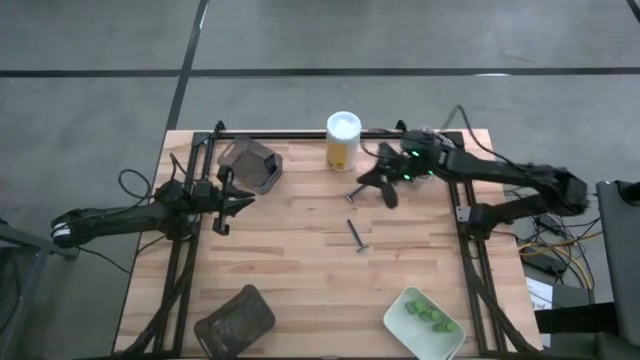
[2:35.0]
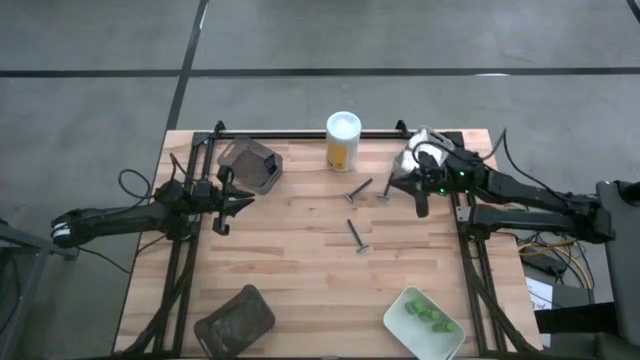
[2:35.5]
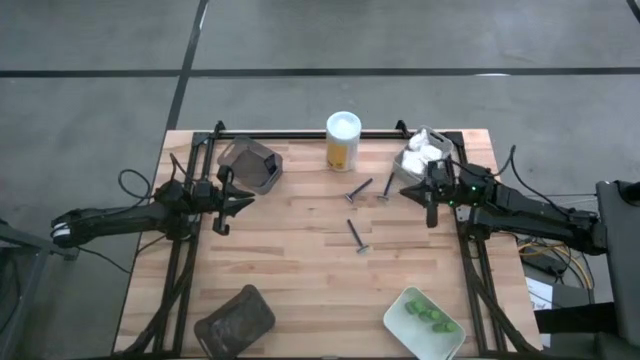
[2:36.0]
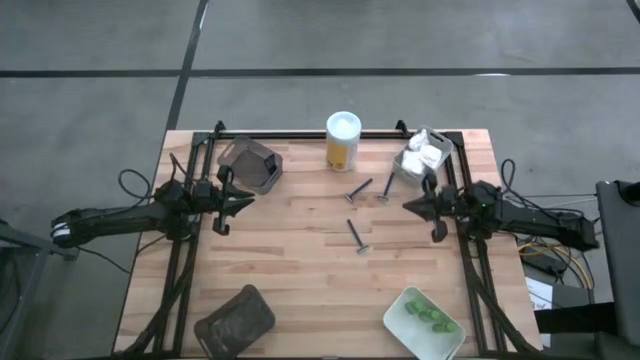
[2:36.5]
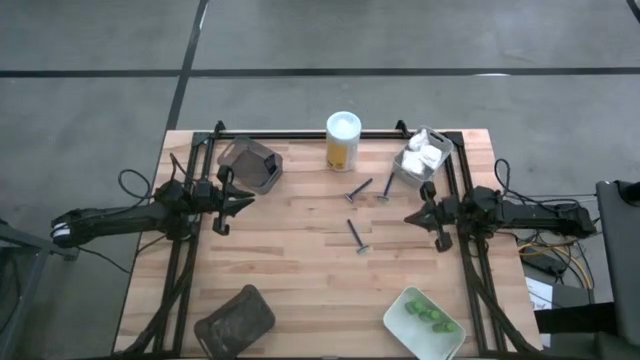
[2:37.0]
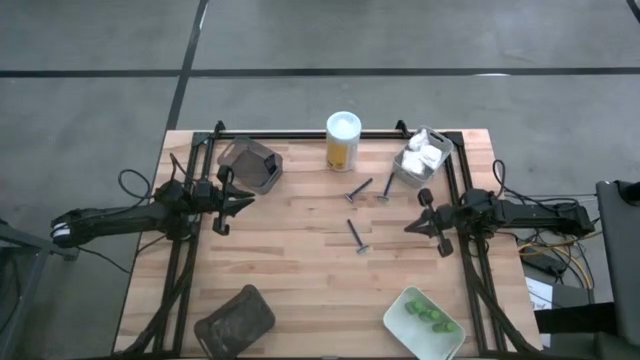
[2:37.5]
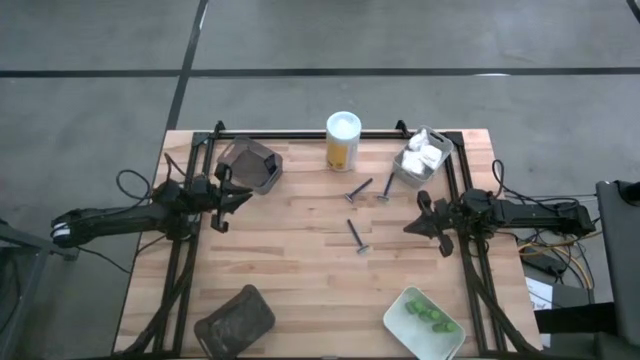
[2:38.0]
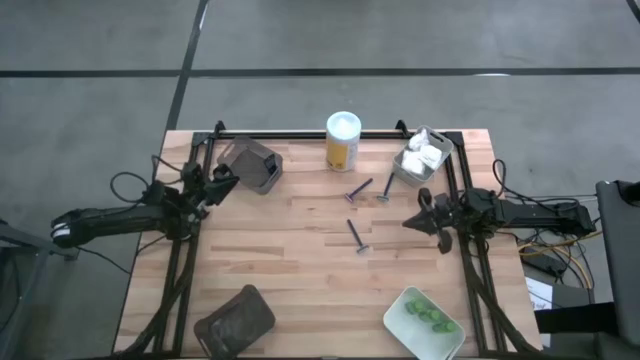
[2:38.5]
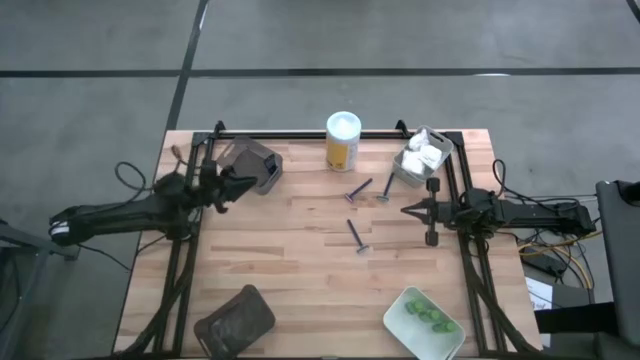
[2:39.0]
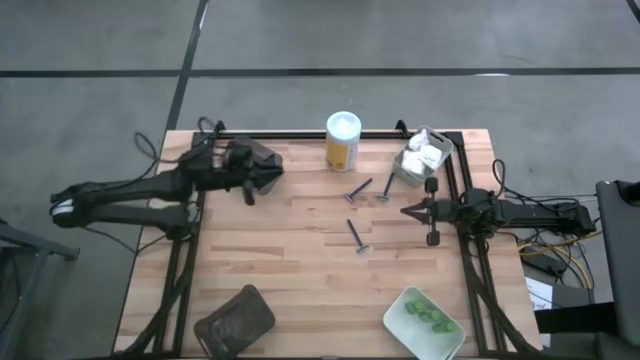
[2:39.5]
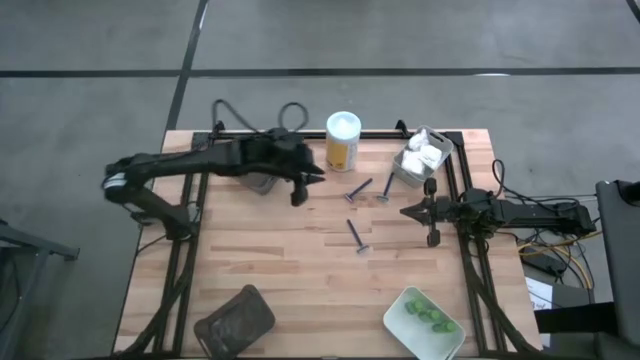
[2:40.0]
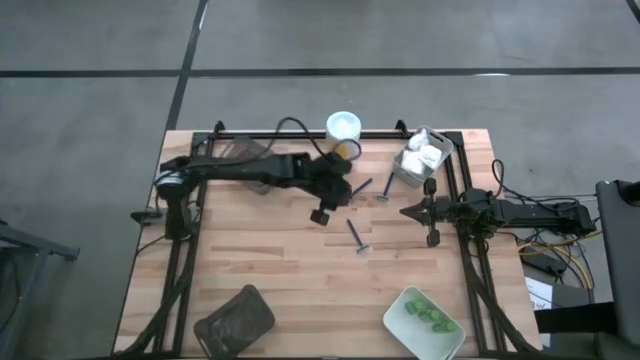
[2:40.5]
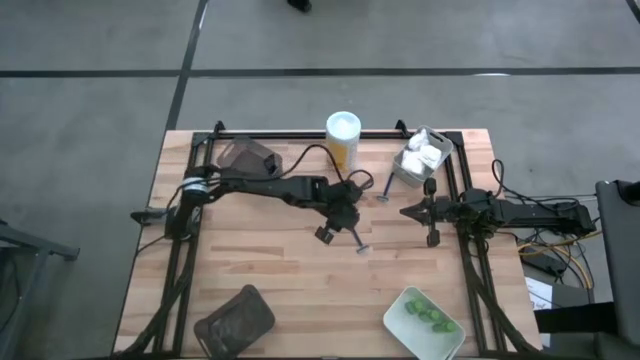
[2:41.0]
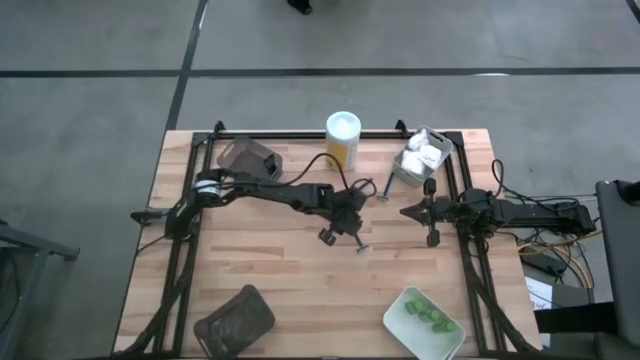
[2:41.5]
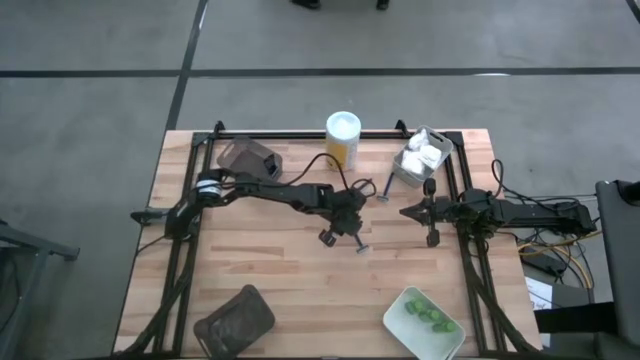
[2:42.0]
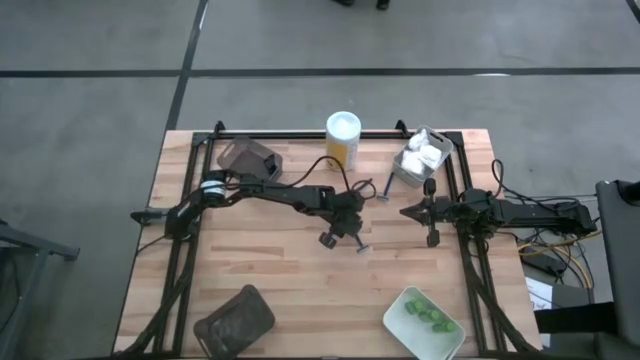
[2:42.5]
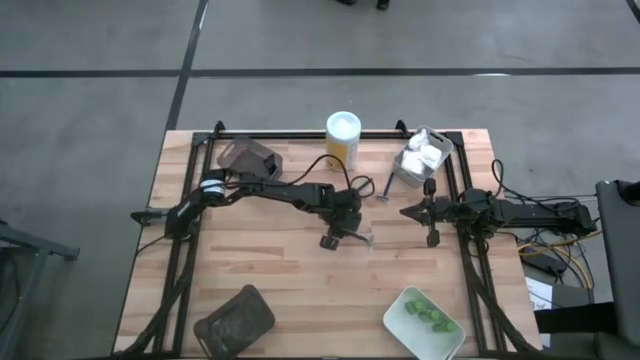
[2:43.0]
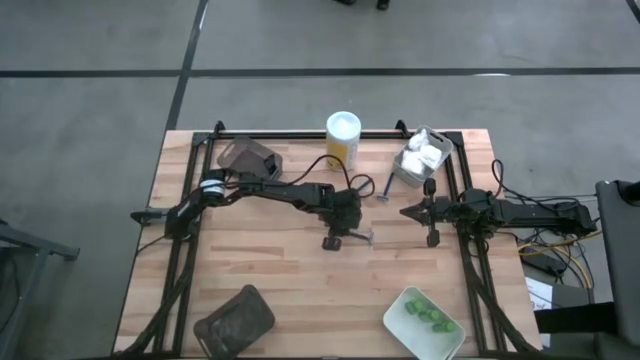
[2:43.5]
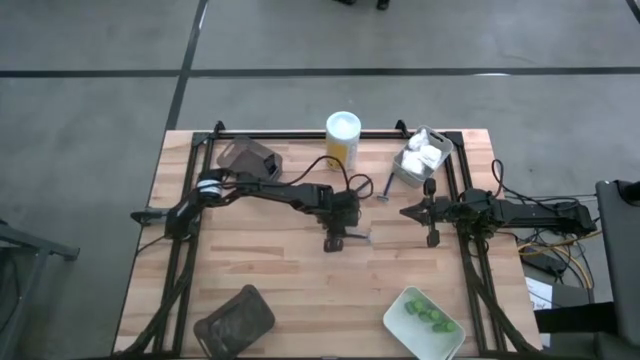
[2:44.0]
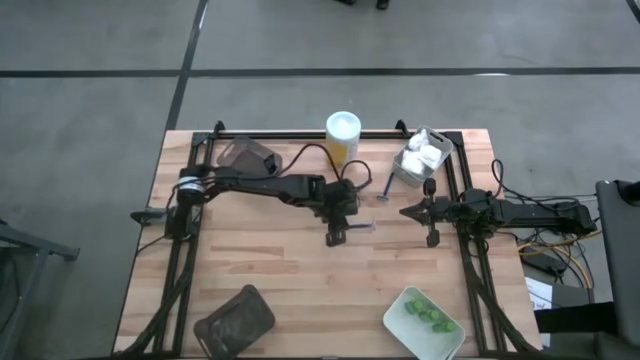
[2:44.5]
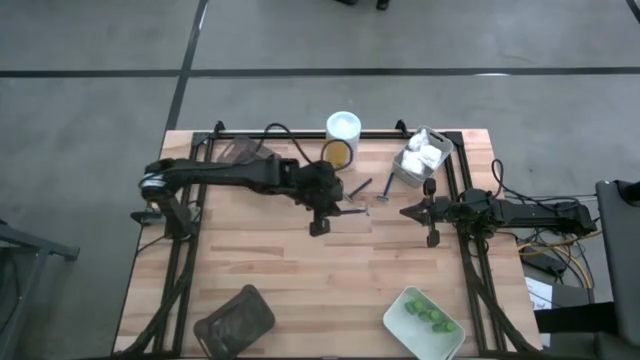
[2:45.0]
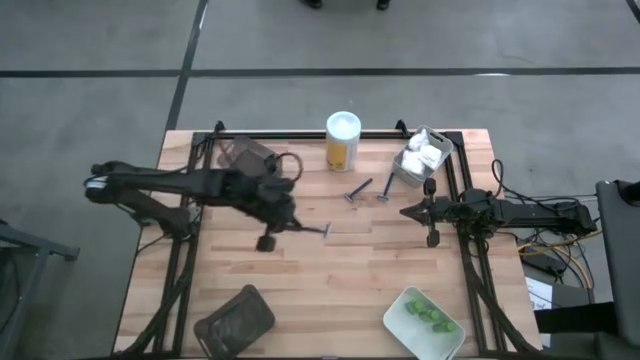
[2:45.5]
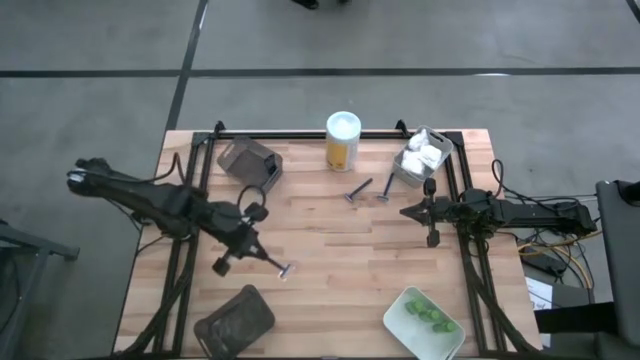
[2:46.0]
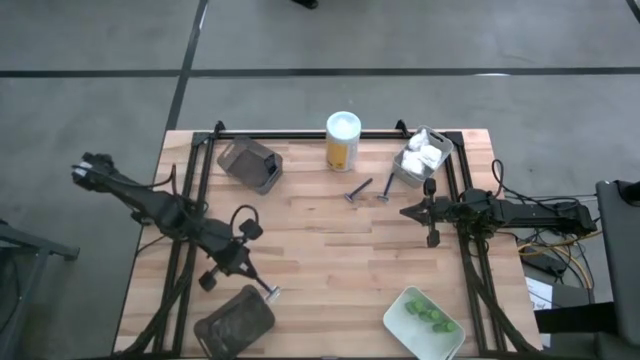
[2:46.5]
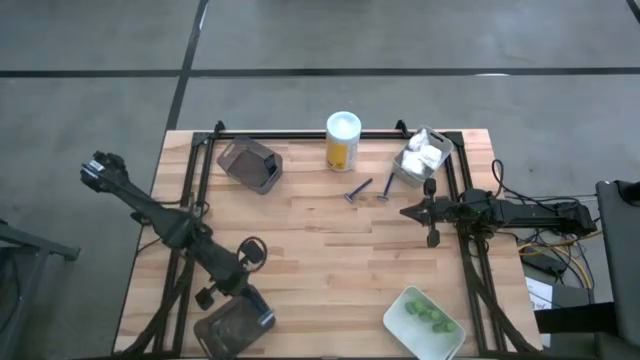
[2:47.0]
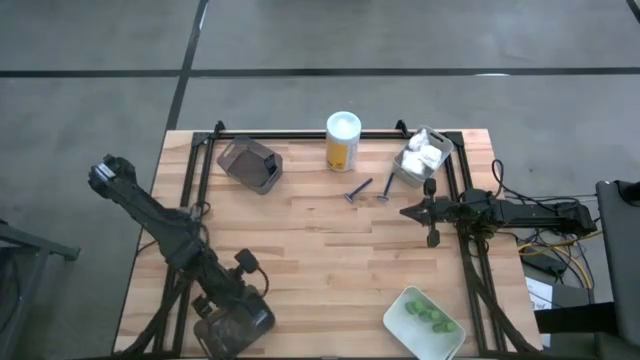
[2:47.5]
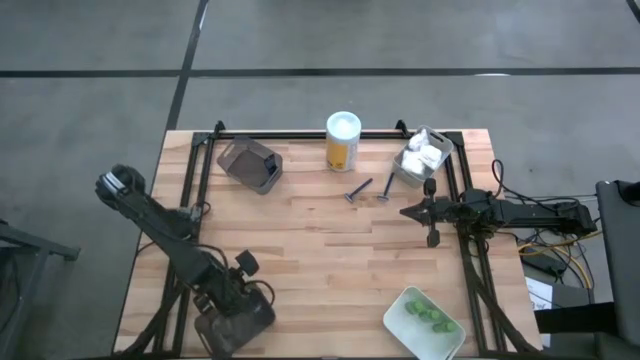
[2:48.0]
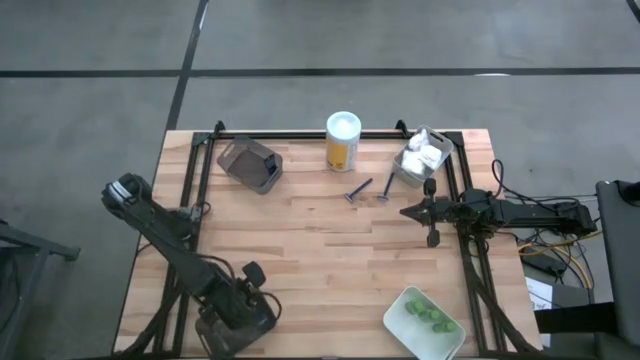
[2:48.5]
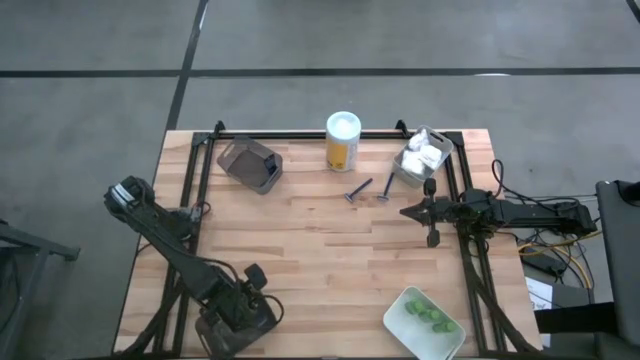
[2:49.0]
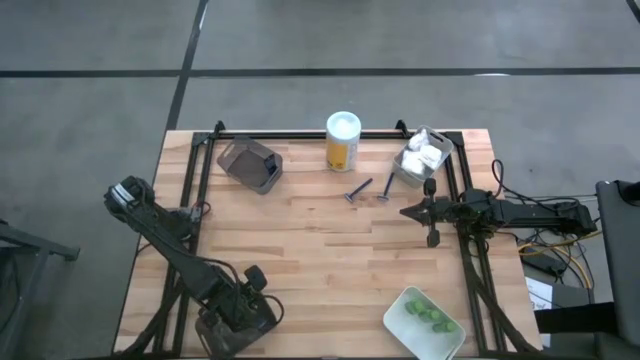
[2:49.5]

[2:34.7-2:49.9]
Task: Pick & Place Travel size toiletries
Put the blue razor into the bottom black bin

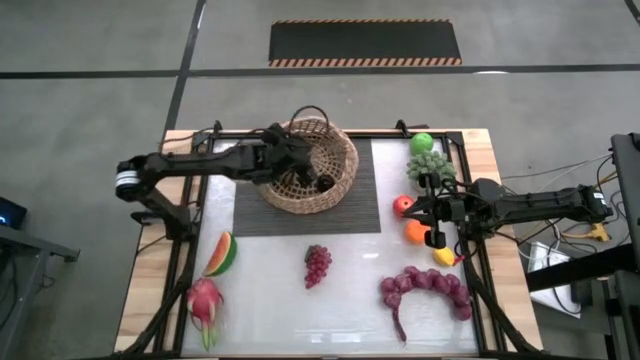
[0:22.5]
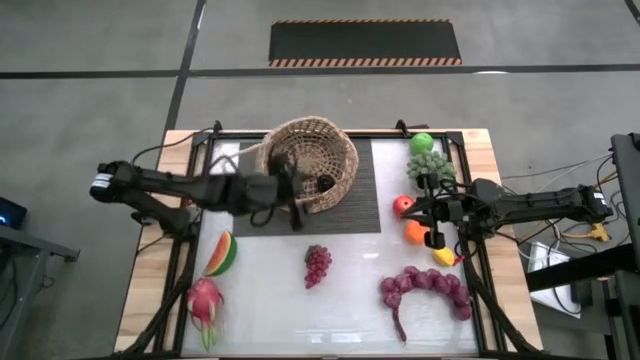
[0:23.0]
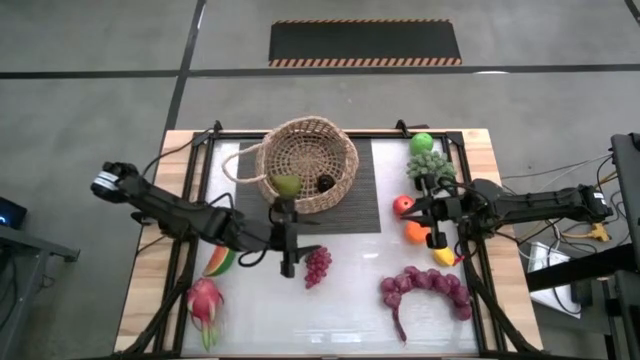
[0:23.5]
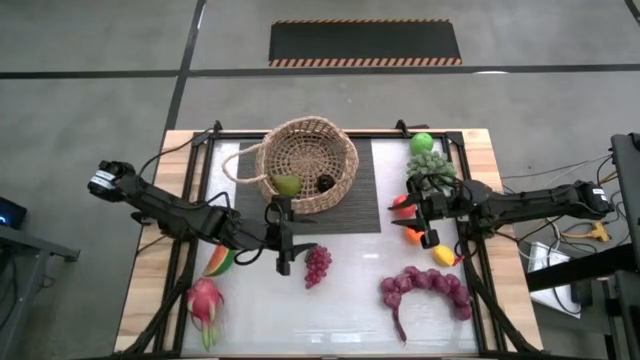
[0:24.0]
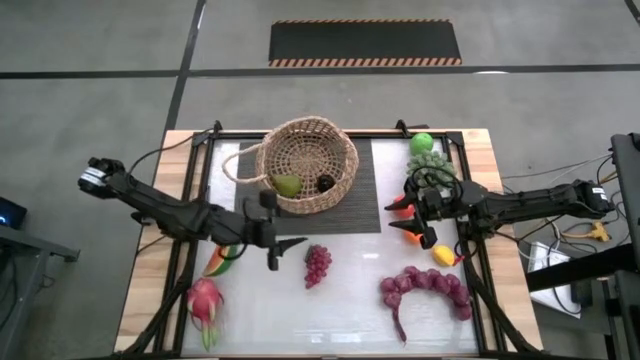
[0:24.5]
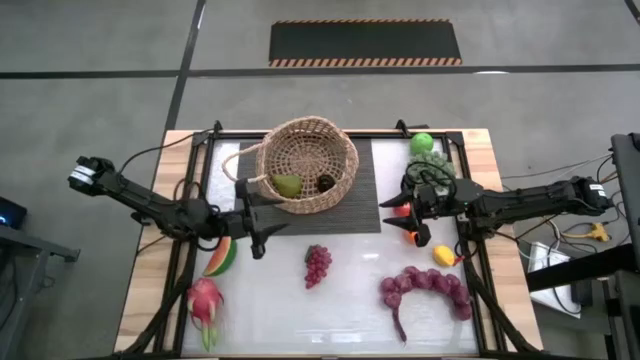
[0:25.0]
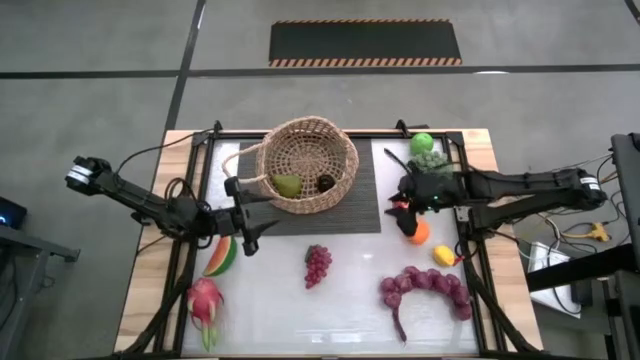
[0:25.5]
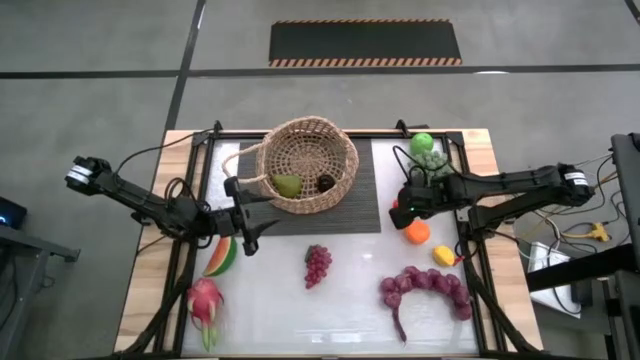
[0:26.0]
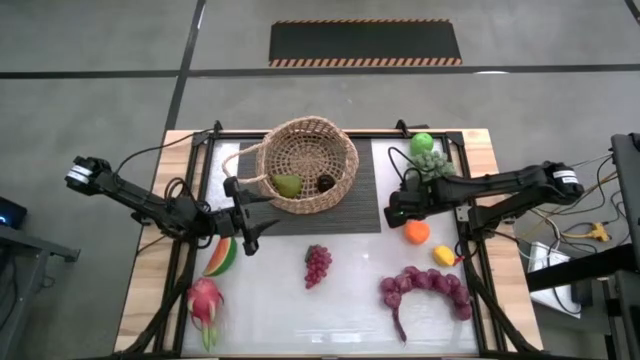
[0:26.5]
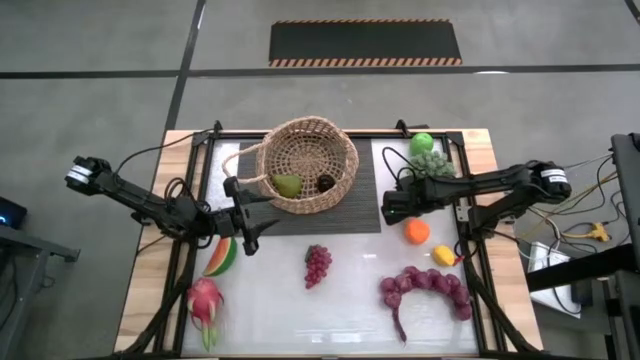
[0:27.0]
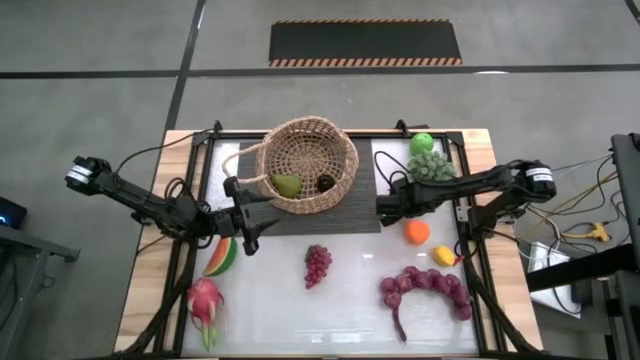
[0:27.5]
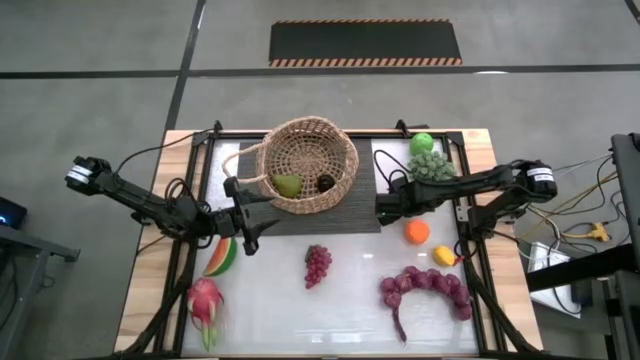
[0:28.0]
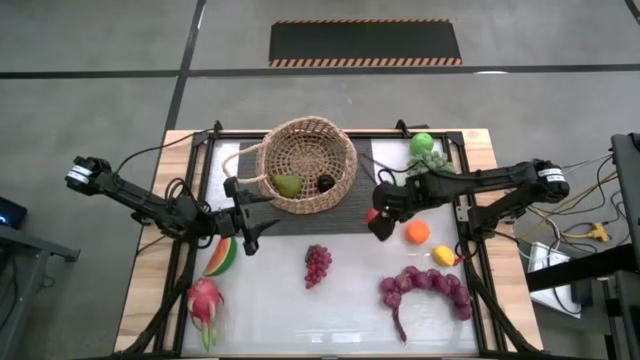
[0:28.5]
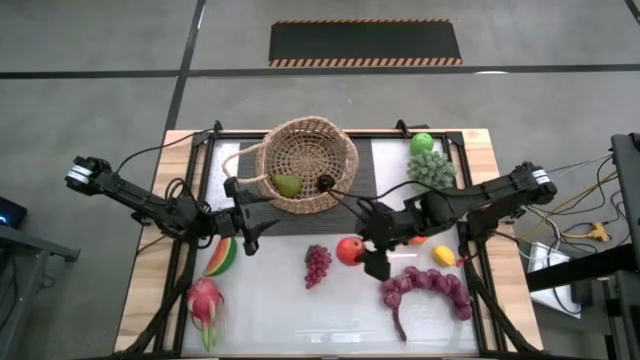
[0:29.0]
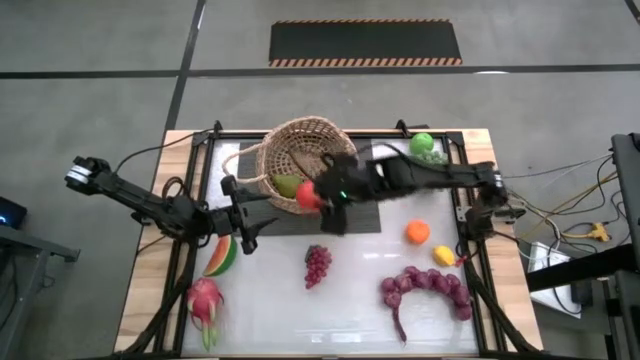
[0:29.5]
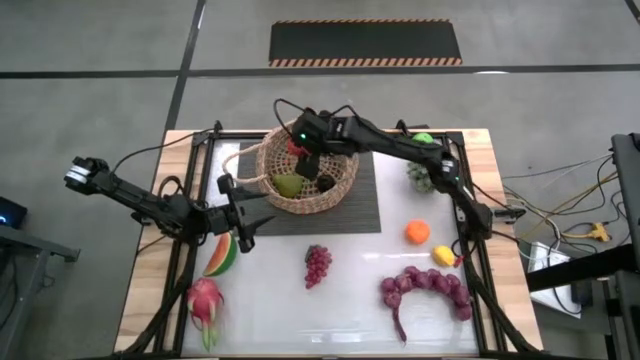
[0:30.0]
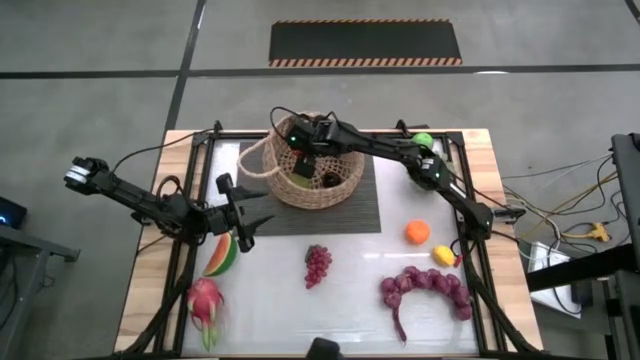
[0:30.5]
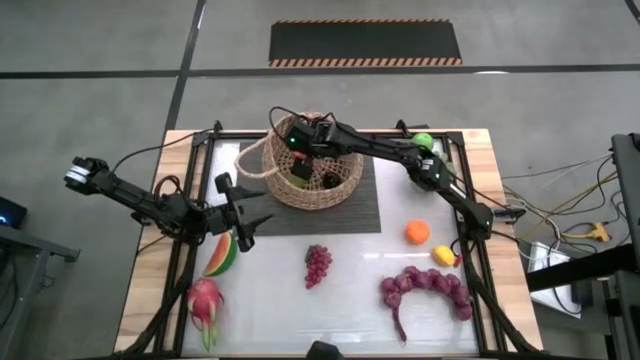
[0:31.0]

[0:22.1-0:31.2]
Task: Build produce basket
Put the red apple into the basket
